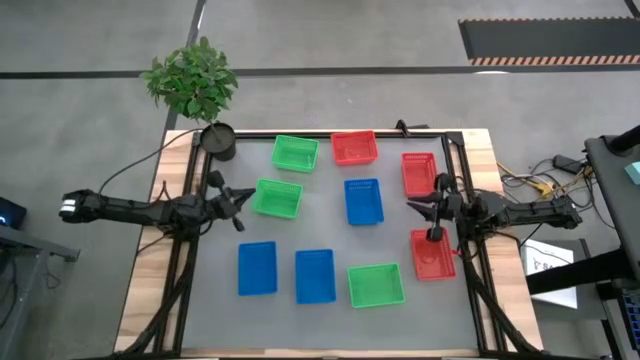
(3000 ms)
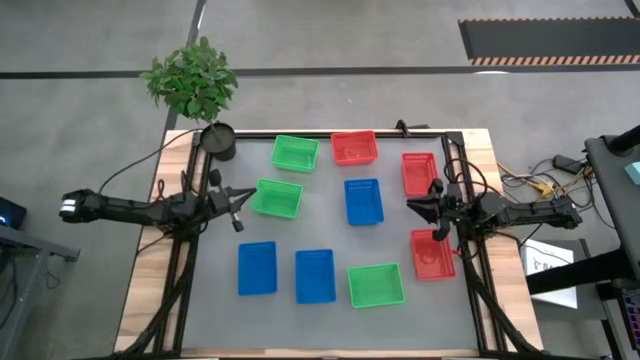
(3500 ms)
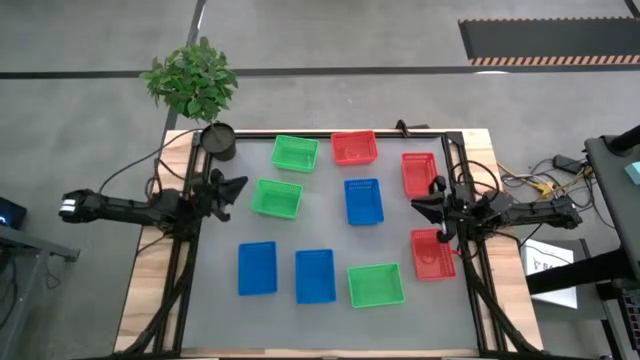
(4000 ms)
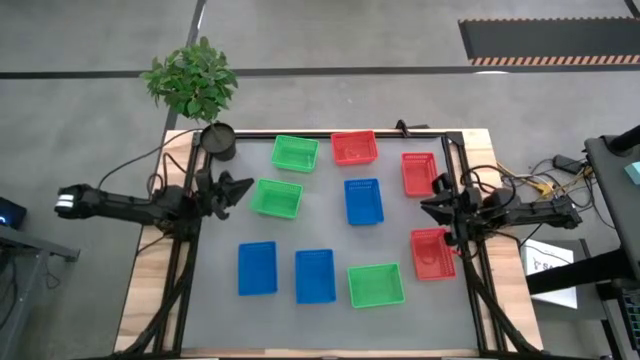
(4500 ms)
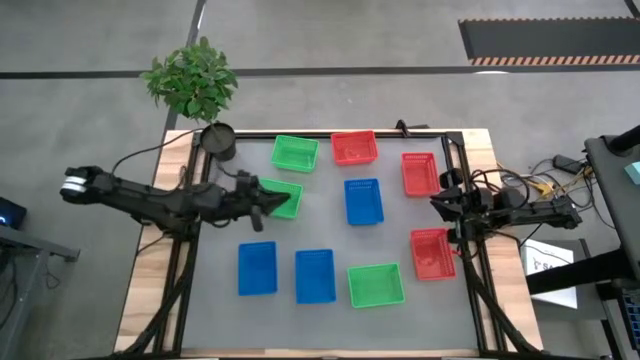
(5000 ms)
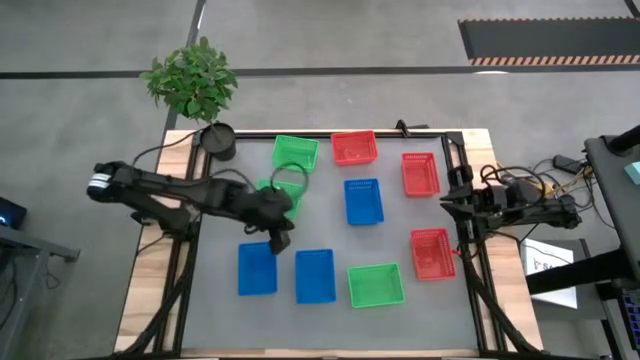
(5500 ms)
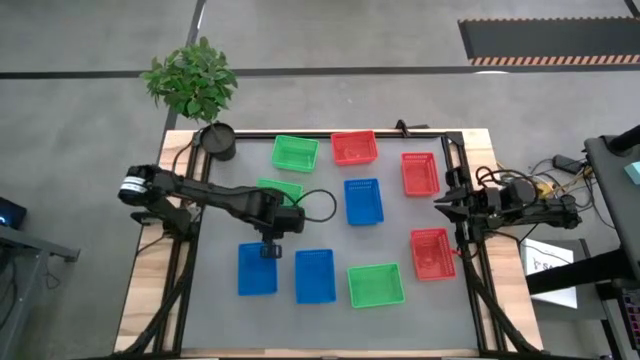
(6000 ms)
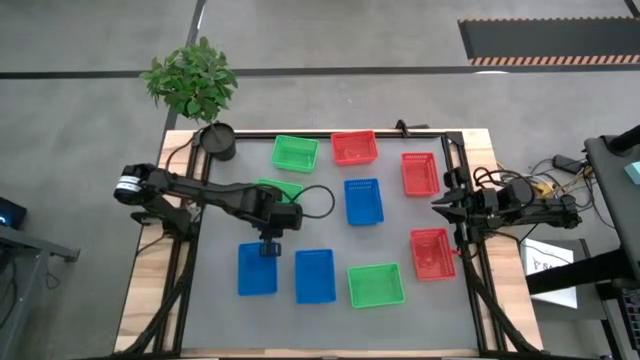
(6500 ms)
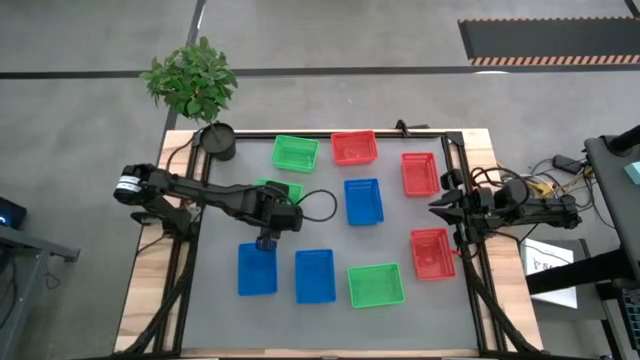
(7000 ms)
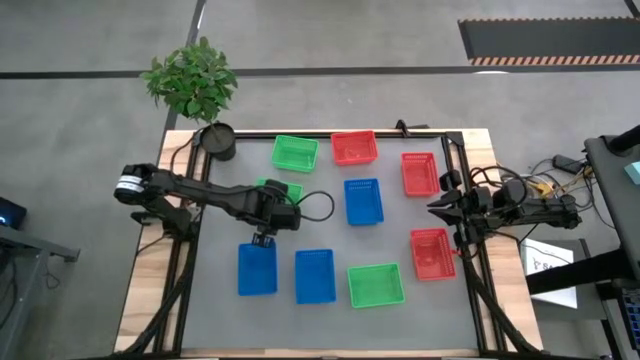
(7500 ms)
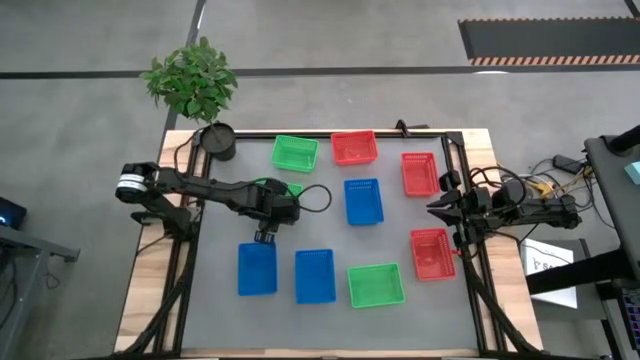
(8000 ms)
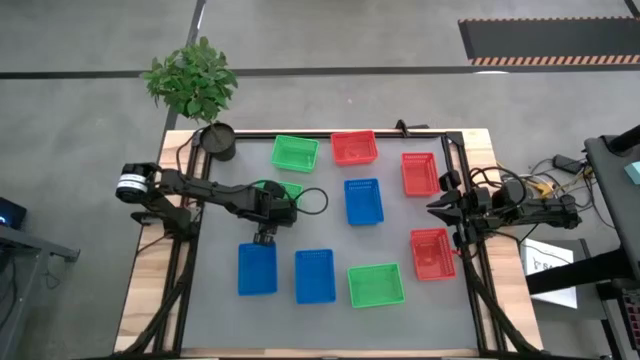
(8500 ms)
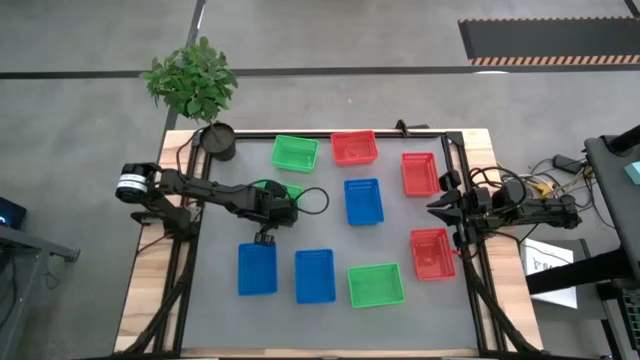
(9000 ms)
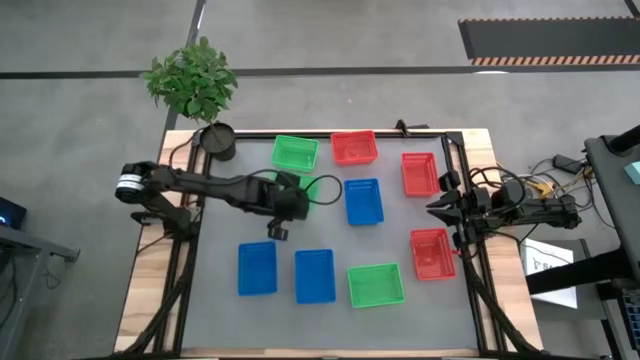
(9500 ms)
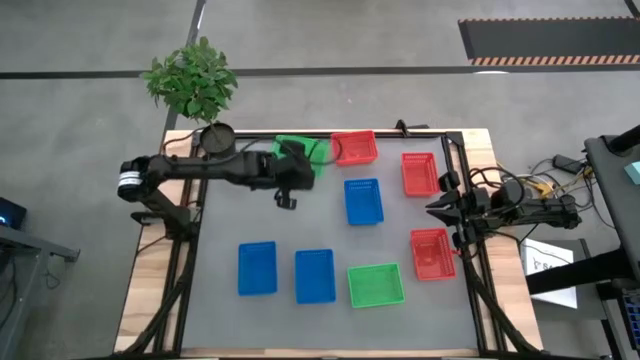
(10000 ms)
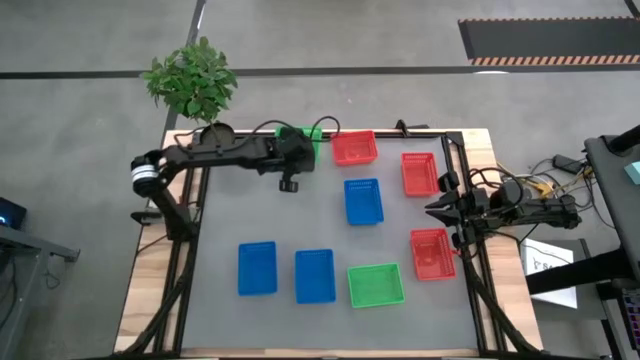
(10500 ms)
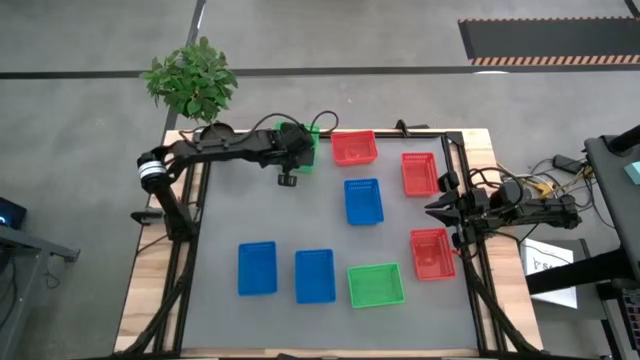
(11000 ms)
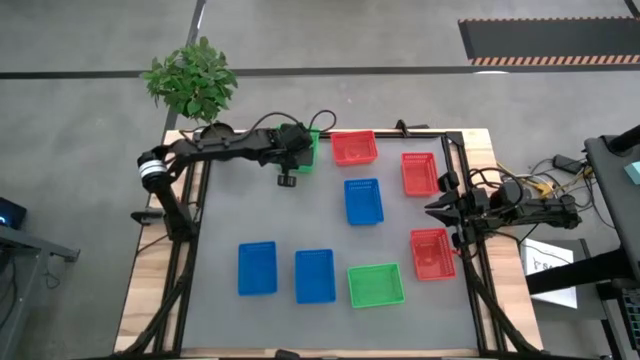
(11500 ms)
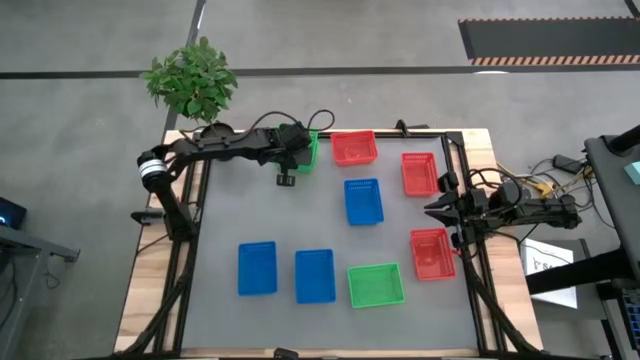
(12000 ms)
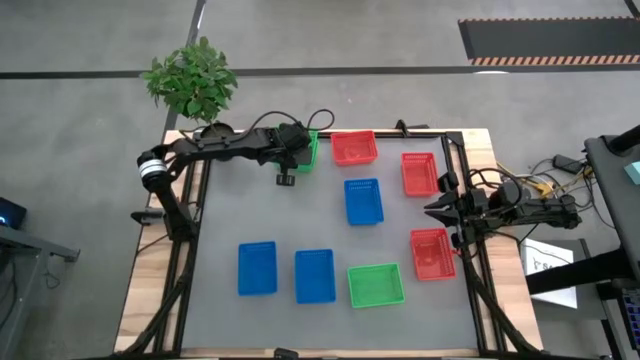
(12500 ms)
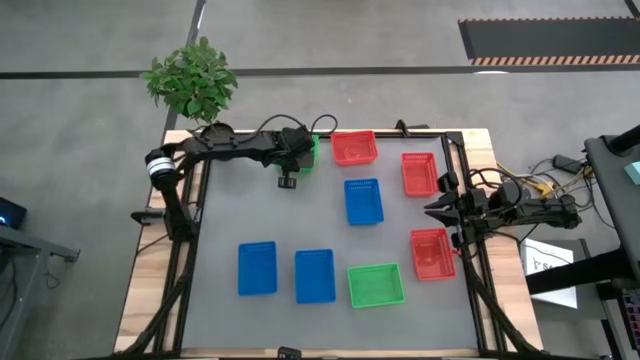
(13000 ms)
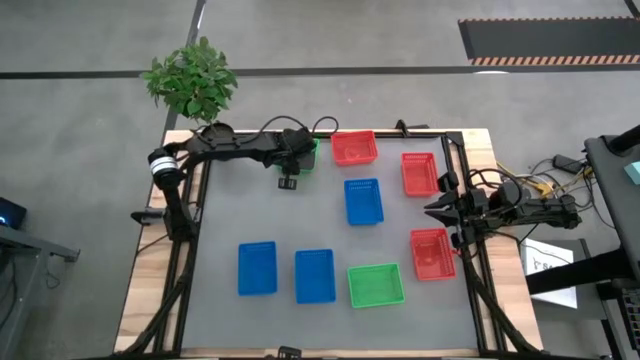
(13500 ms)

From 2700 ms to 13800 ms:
Stack the middle green bin on the top green bin

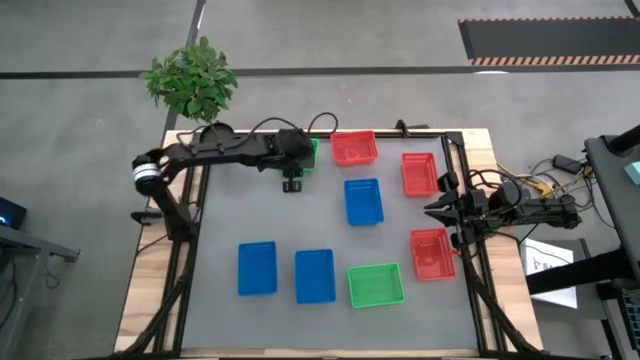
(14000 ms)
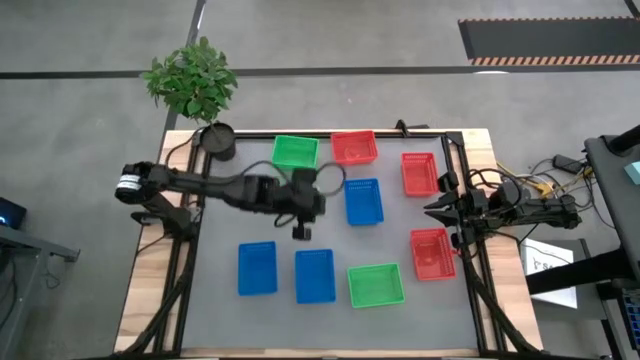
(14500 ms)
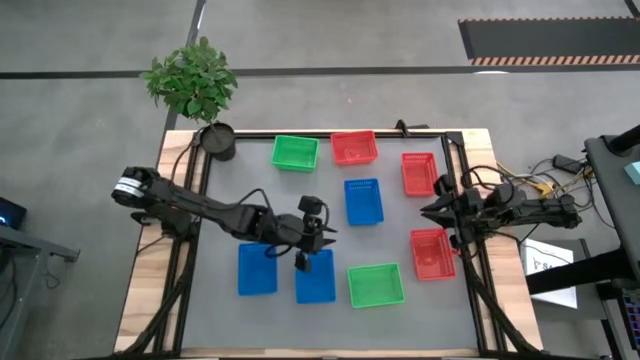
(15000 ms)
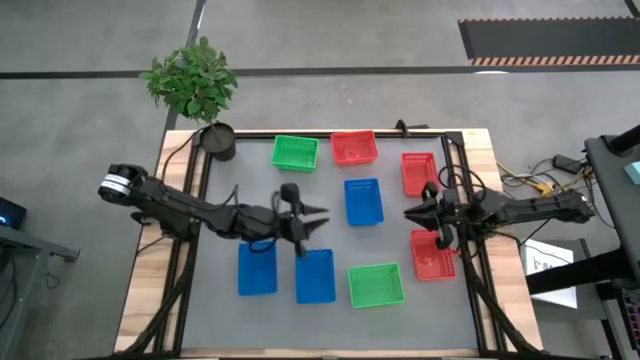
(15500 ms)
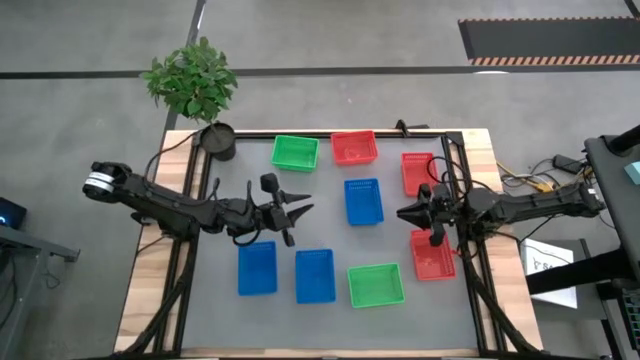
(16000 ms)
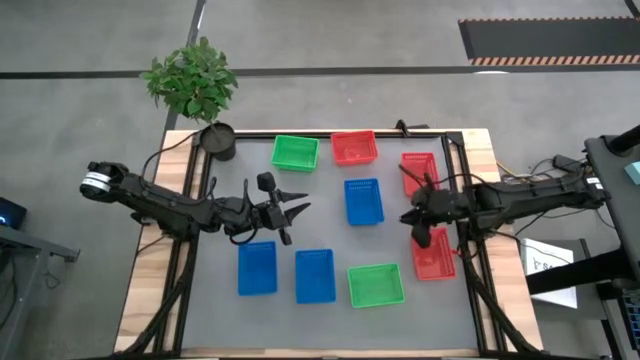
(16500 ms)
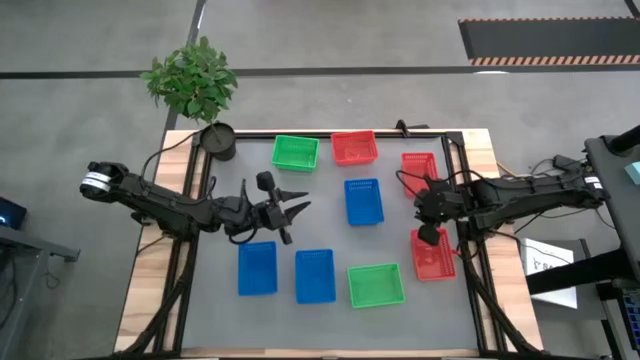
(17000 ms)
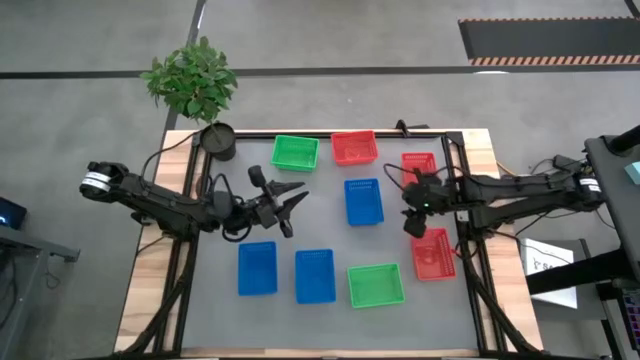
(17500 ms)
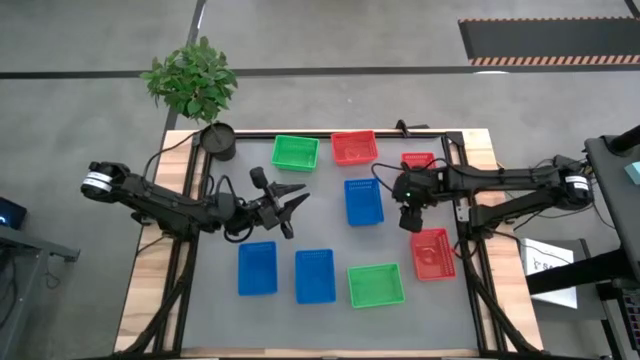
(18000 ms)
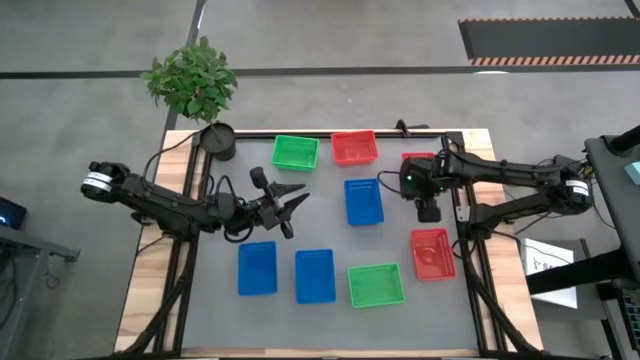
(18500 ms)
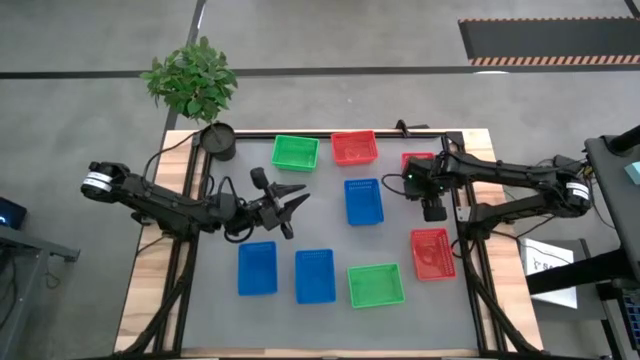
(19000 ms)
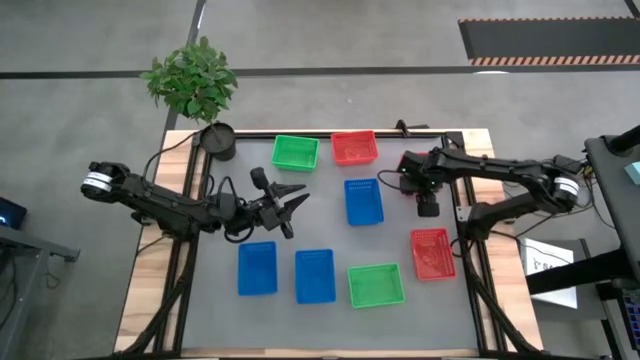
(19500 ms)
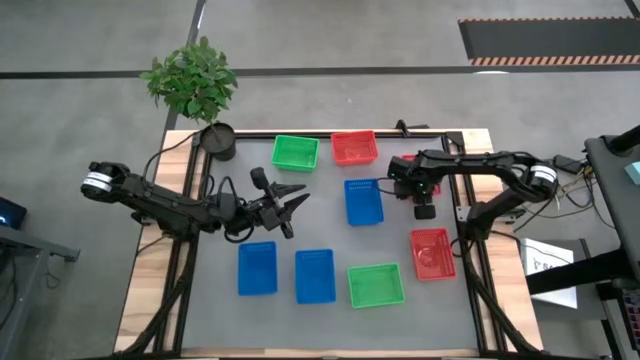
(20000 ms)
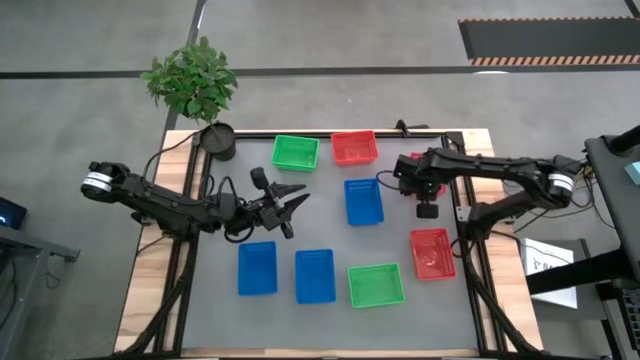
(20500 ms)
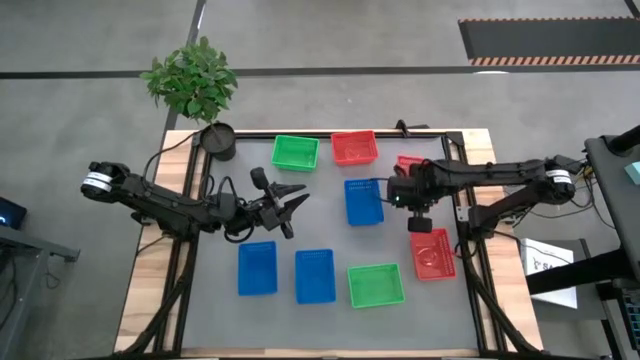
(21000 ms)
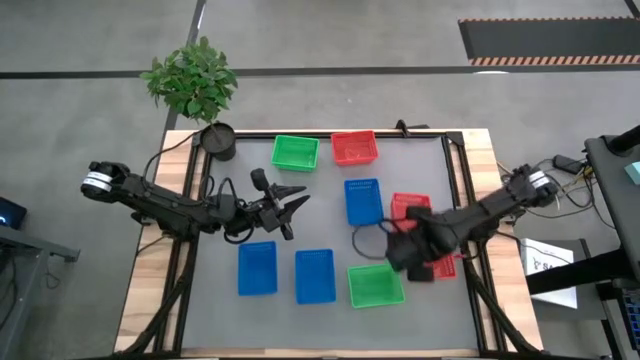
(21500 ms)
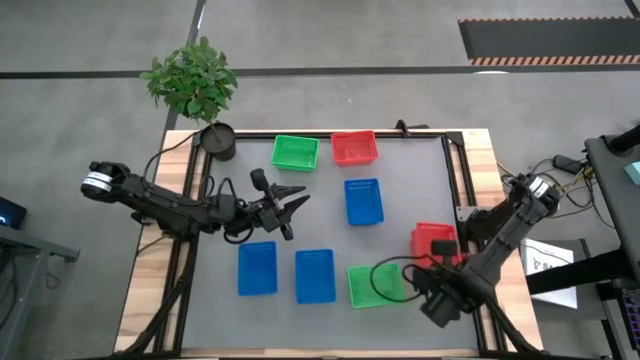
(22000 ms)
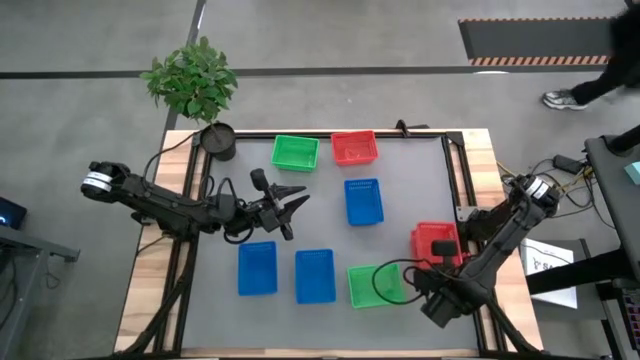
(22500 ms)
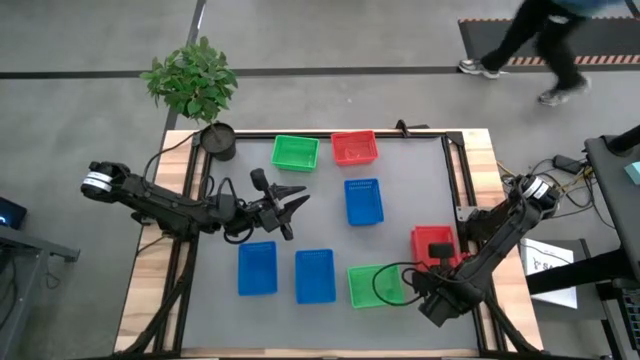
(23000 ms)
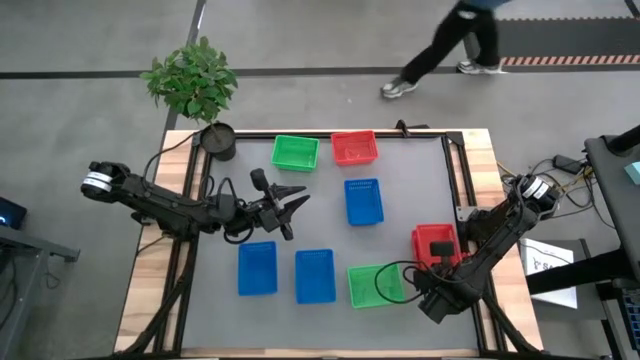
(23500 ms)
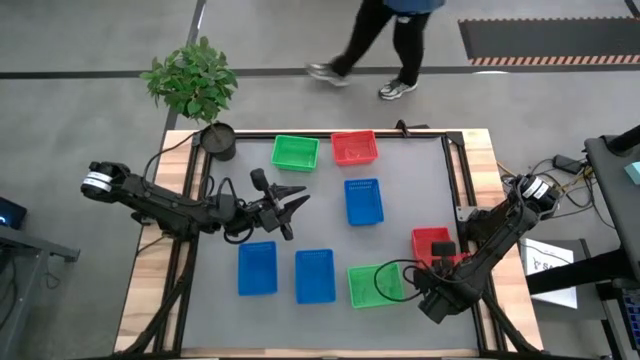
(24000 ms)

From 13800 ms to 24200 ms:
Stack the middle red bin on the bottom red bin
